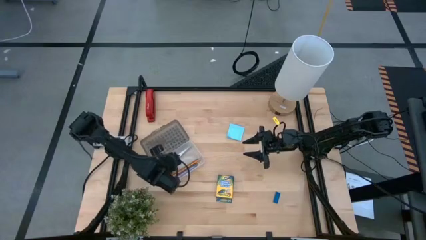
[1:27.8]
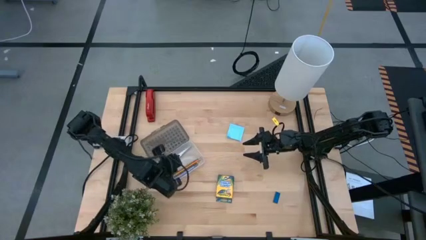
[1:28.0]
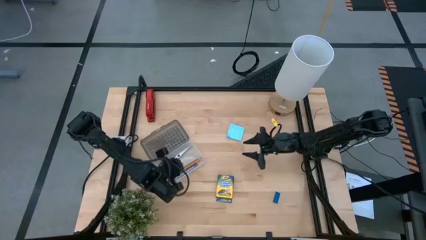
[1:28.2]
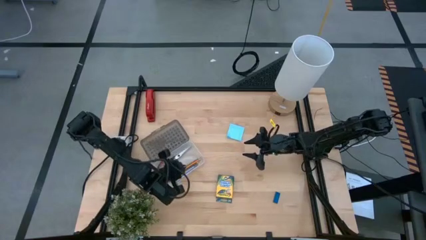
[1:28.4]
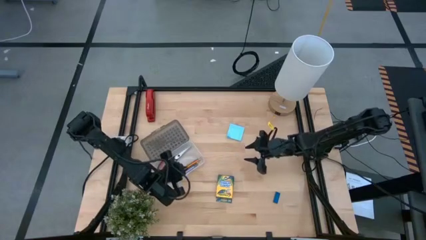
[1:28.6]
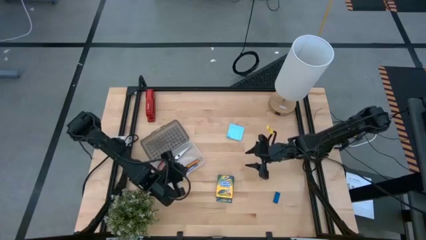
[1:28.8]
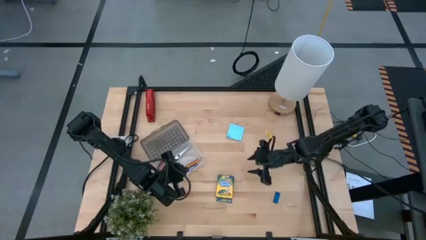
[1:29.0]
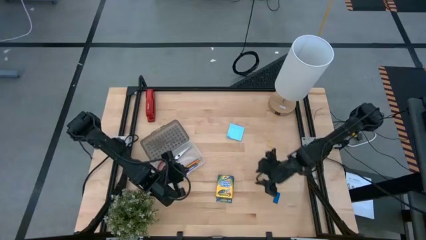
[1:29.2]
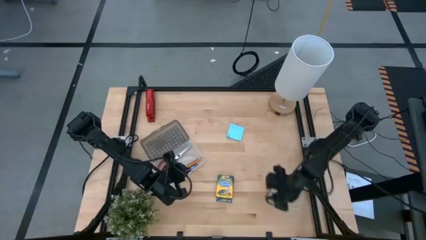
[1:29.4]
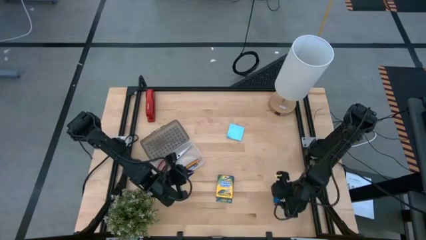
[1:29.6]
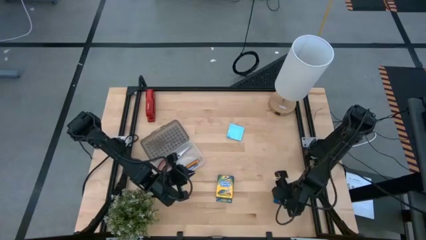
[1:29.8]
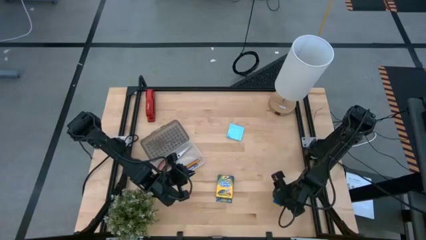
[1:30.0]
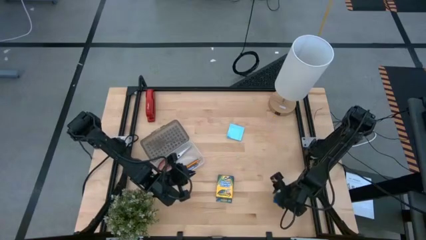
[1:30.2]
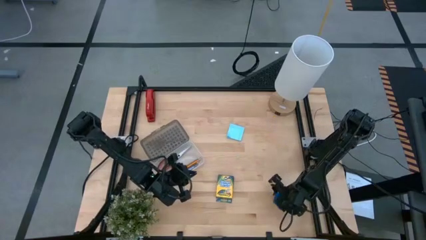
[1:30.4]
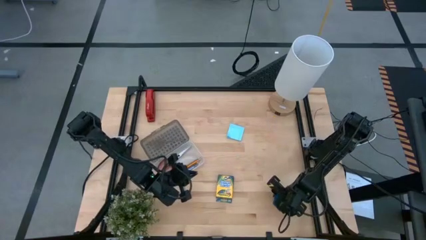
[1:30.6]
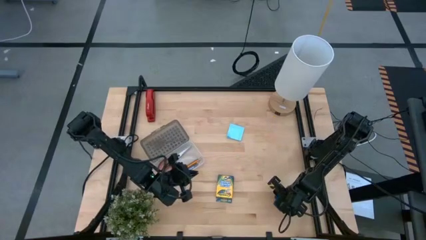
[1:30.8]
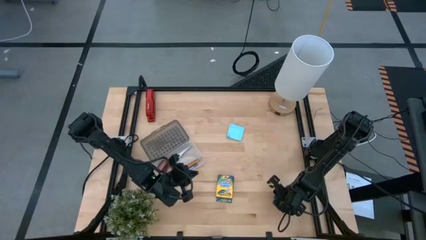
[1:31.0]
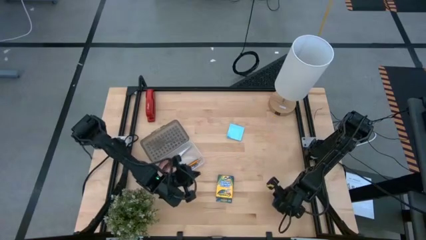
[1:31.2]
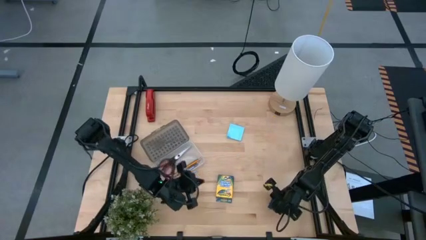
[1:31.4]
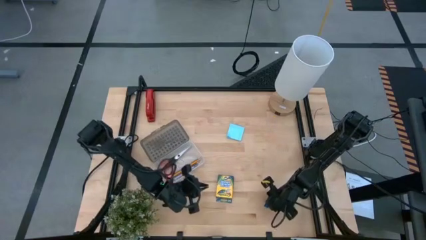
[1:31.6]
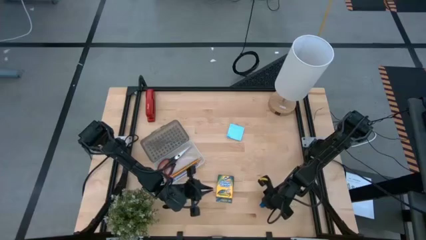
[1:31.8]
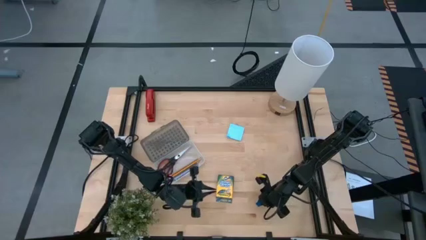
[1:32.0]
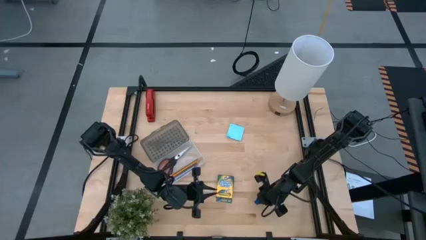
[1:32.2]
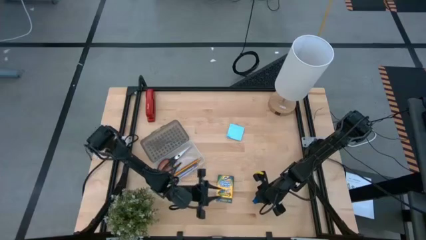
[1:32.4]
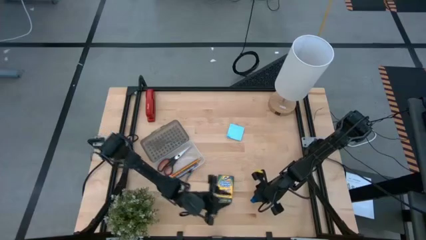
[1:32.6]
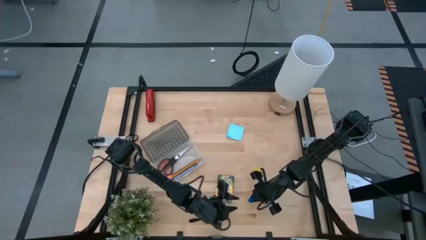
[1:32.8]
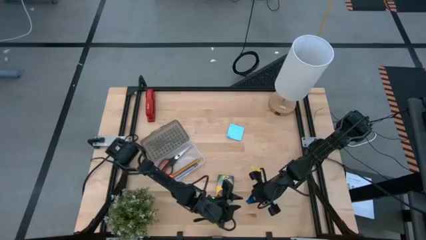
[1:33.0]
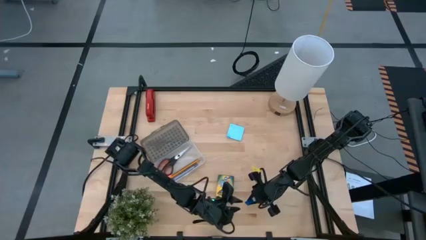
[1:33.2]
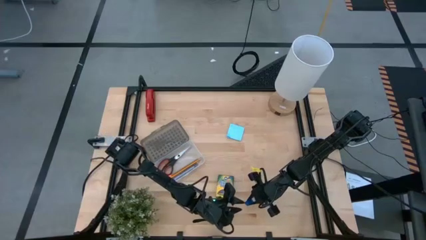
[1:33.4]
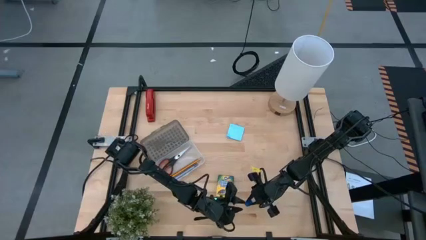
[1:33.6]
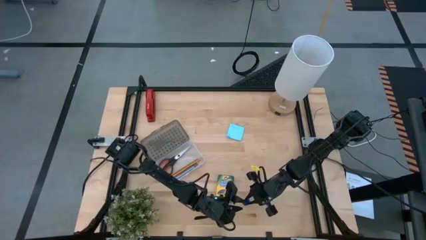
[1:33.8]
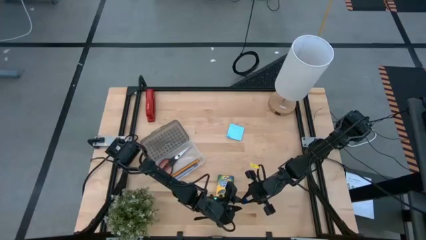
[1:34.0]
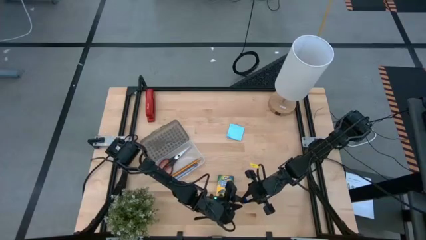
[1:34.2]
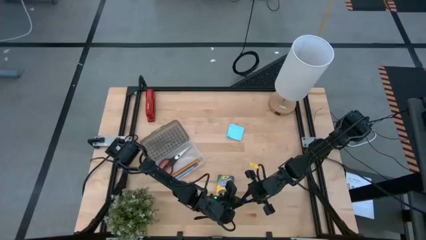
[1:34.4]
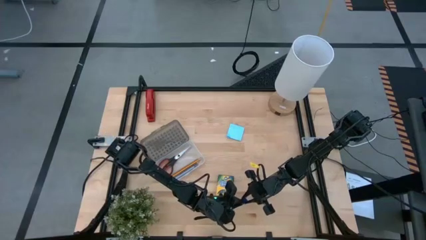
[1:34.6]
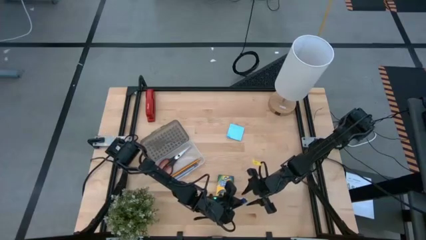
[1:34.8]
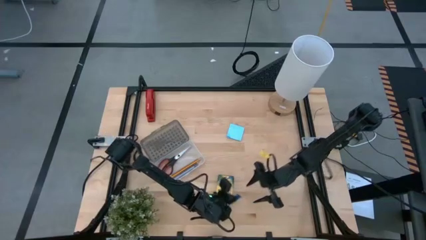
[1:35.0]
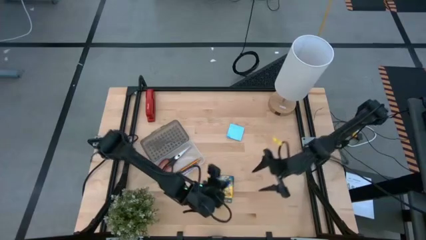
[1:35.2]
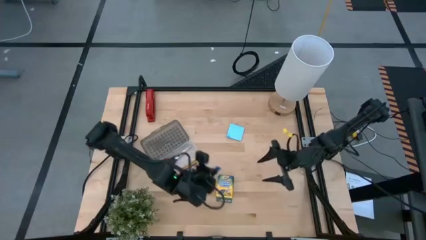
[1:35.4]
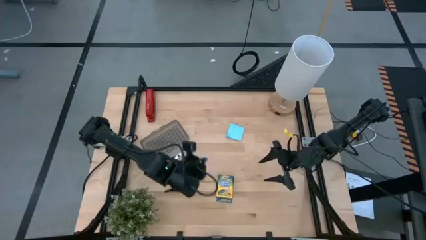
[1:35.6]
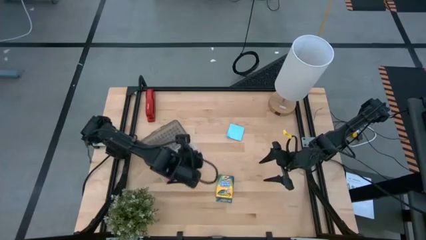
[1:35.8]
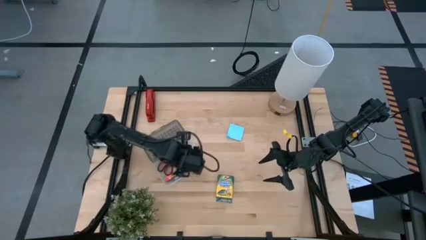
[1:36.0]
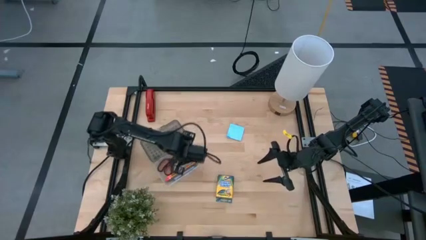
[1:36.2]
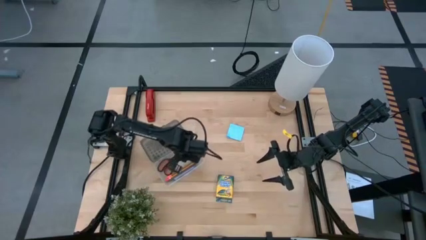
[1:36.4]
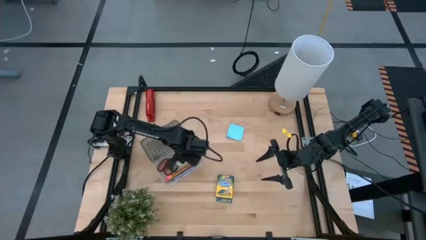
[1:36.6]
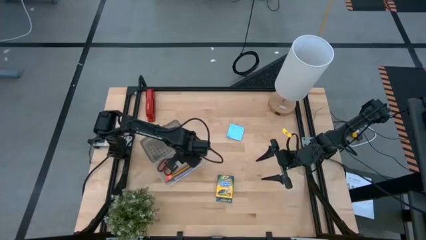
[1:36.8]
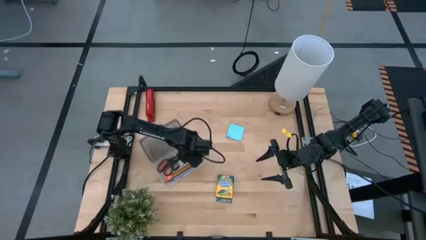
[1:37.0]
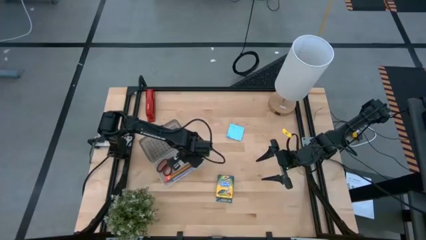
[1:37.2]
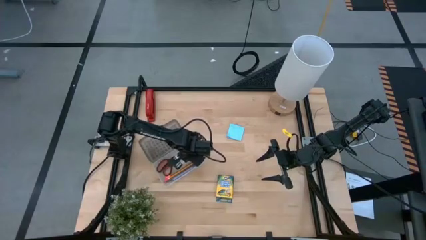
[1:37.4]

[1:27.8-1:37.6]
Task: Pack school essentials
Put the blue eraser into the supply box

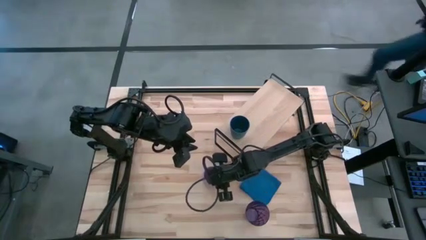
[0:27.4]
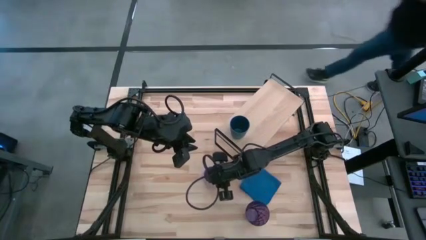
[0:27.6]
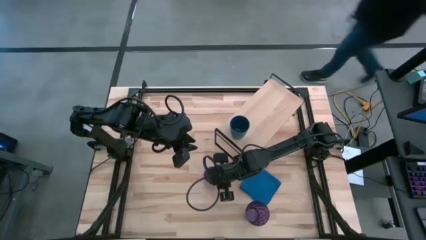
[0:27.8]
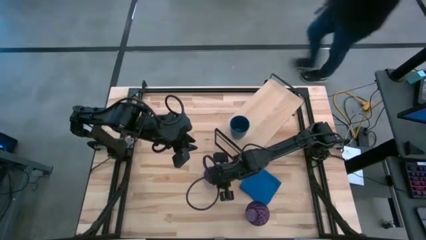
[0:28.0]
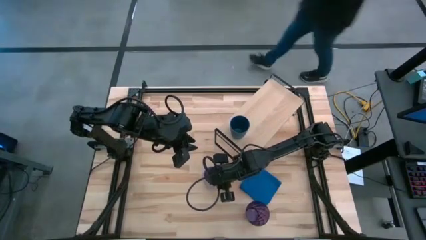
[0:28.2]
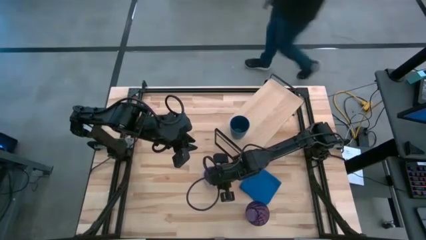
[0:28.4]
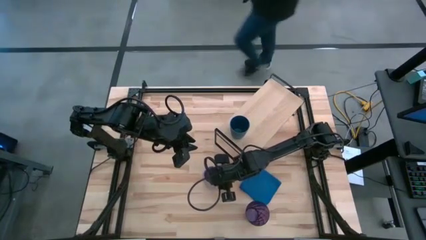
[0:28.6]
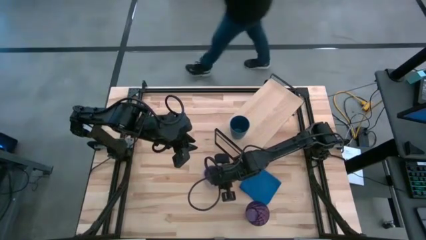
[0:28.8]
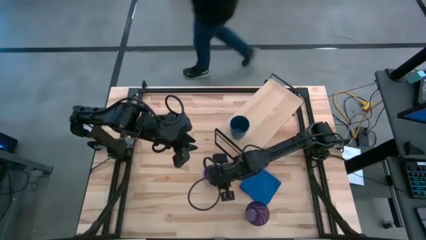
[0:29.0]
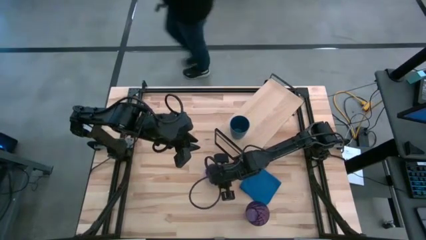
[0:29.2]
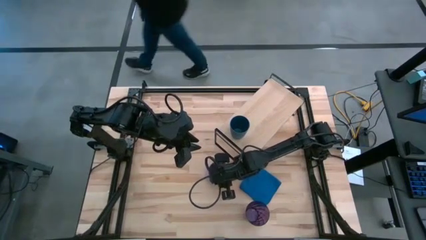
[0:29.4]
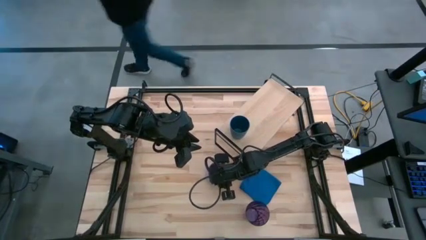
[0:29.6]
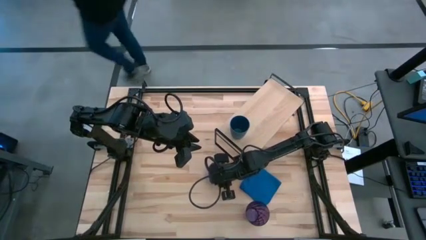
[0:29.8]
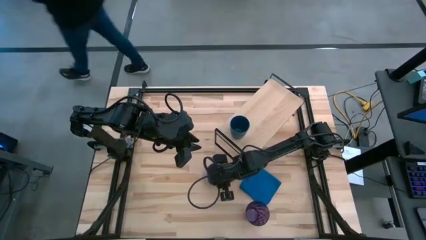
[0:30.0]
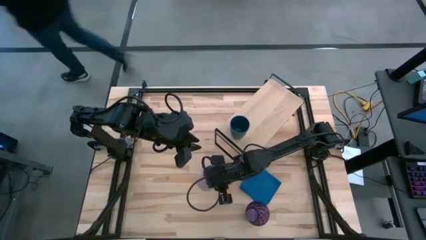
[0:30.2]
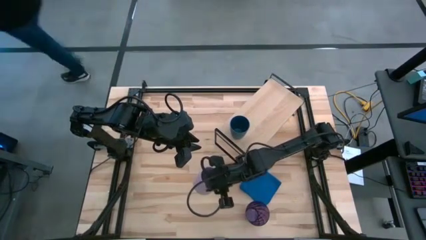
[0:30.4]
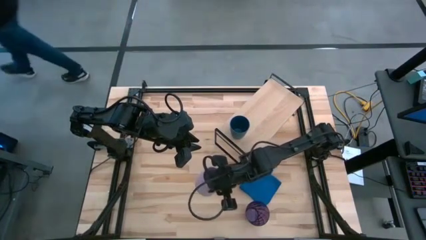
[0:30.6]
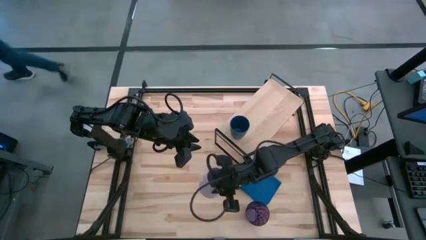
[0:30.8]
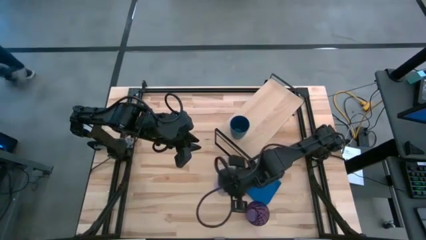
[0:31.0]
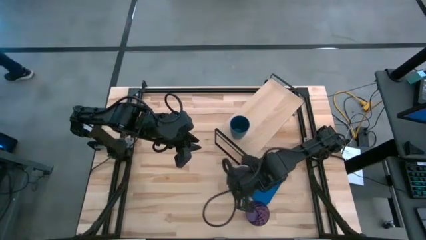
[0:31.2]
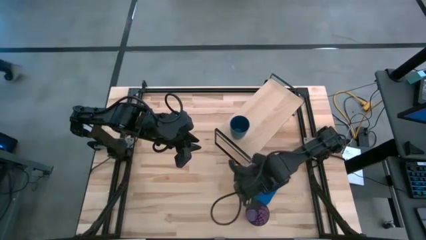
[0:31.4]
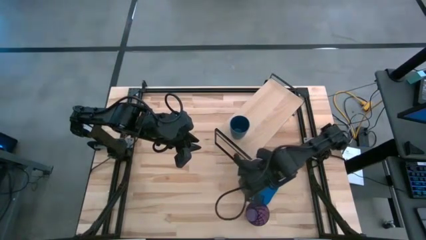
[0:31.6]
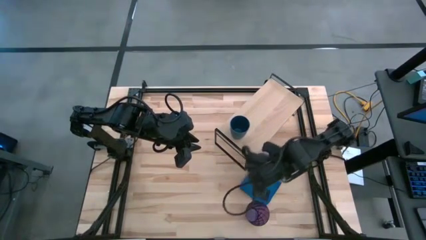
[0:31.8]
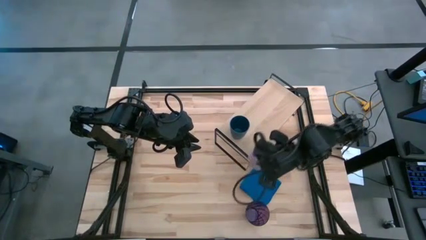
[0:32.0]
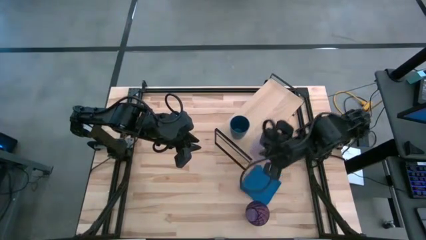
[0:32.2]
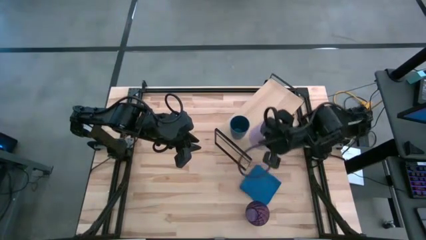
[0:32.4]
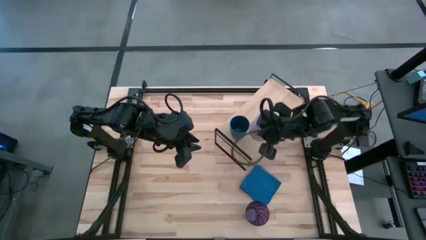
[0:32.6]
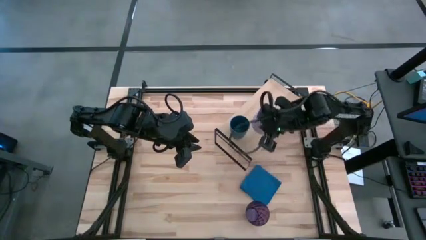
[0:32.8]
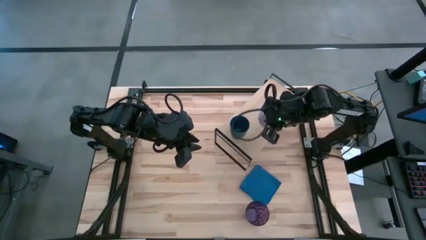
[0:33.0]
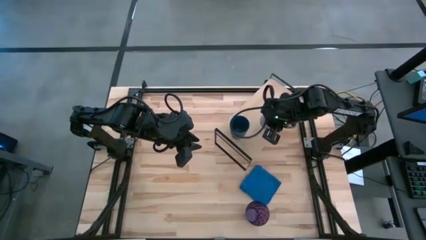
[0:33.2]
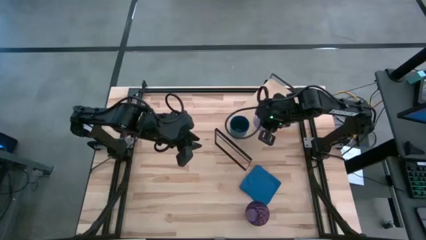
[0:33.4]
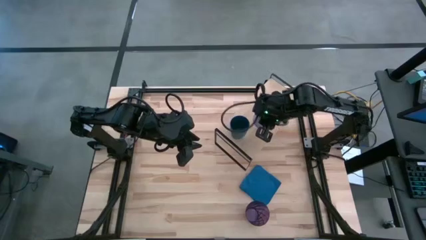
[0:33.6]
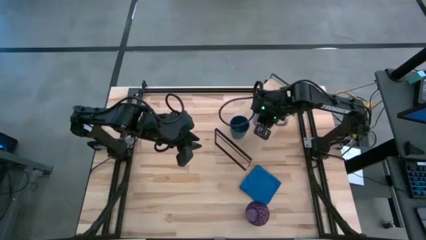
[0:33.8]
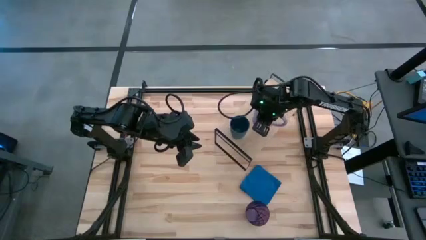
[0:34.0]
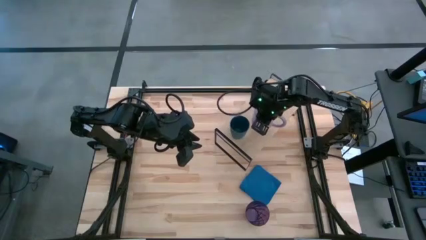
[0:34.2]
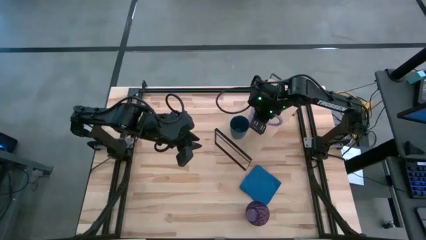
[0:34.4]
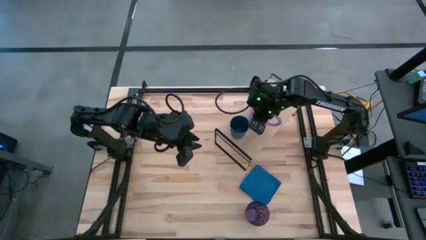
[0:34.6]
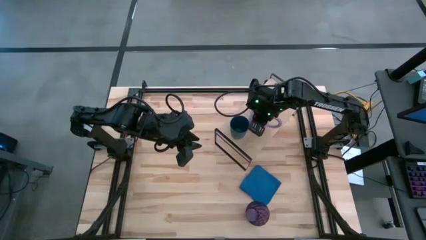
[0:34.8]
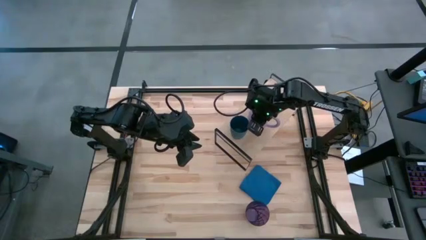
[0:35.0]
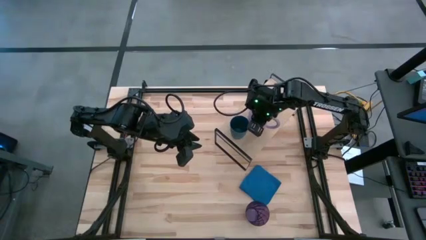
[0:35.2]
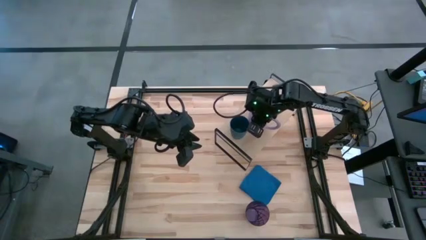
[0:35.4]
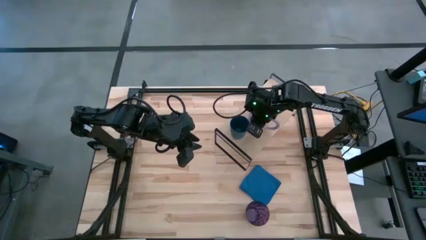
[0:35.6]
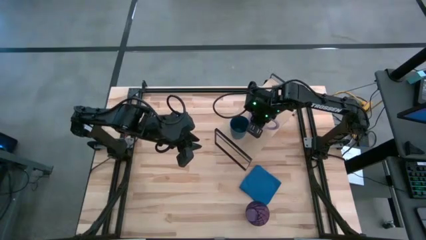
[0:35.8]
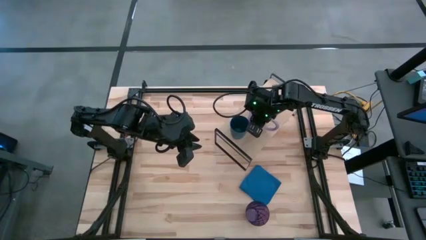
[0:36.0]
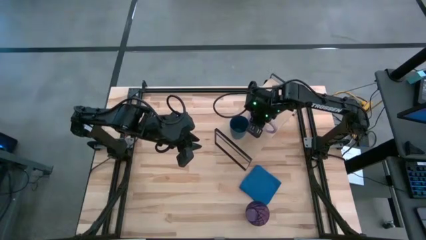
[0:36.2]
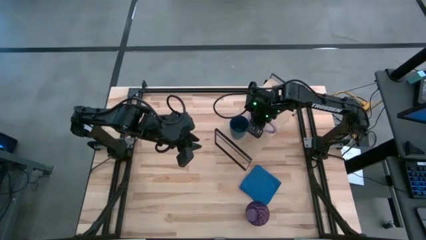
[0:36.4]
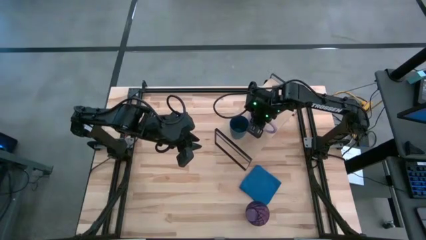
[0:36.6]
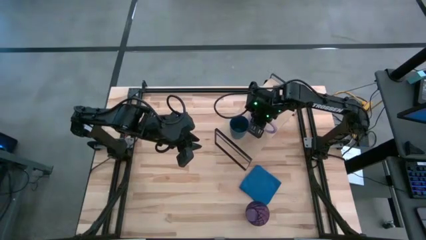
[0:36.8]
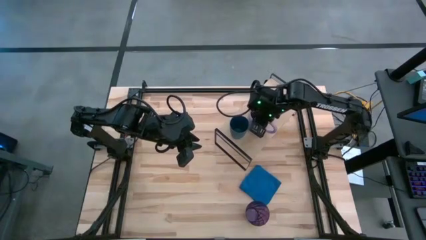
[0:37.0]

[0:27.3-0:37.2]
Task: Stack small to large cups/mugs on shelf
Put the purple mug on the shelf
